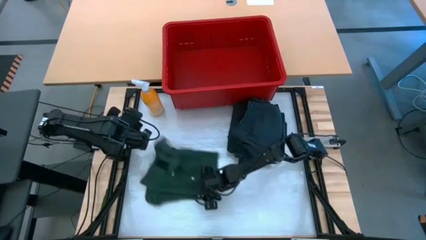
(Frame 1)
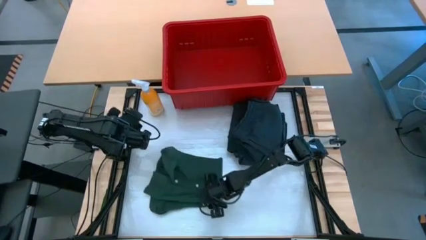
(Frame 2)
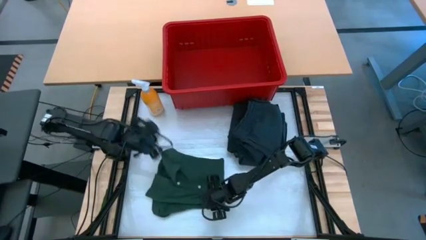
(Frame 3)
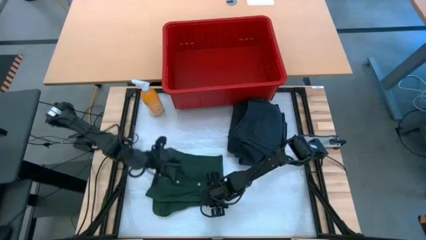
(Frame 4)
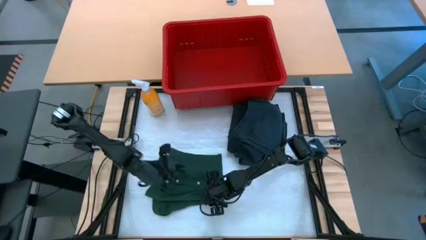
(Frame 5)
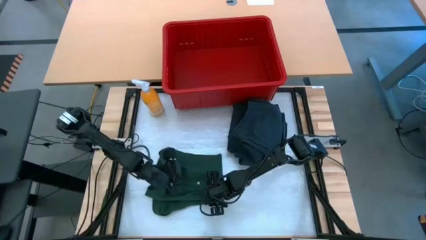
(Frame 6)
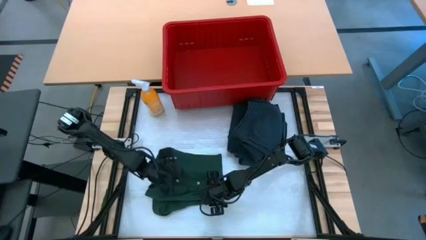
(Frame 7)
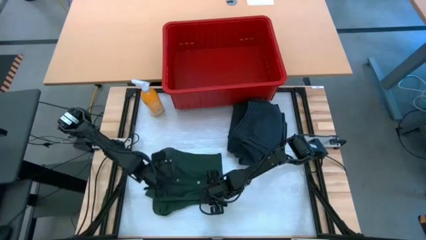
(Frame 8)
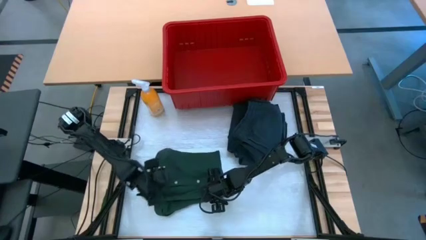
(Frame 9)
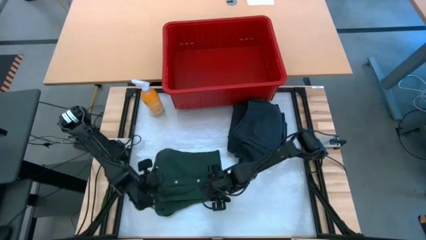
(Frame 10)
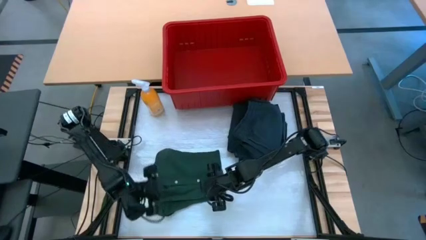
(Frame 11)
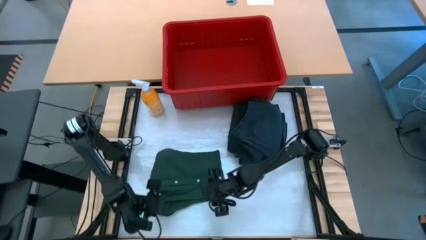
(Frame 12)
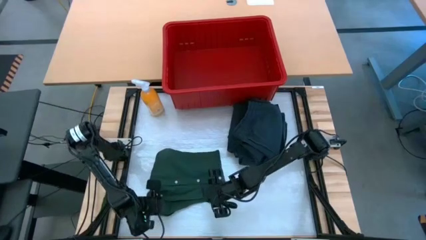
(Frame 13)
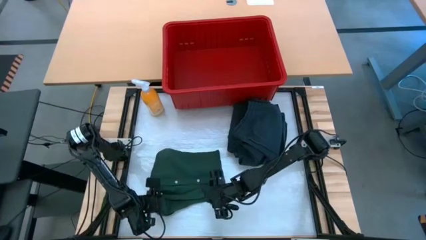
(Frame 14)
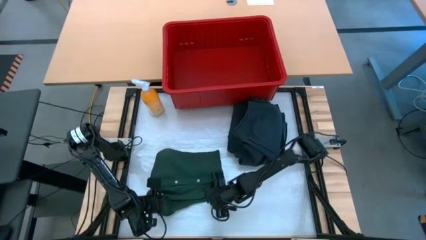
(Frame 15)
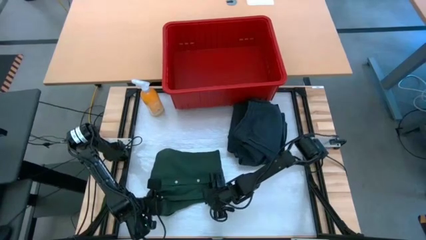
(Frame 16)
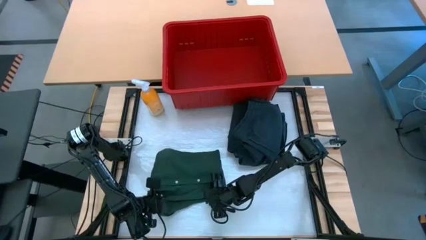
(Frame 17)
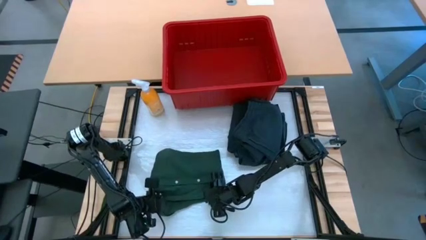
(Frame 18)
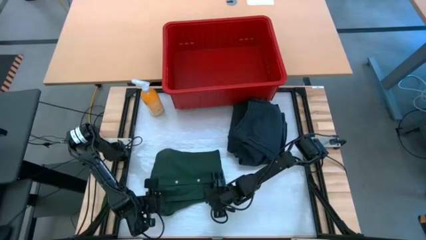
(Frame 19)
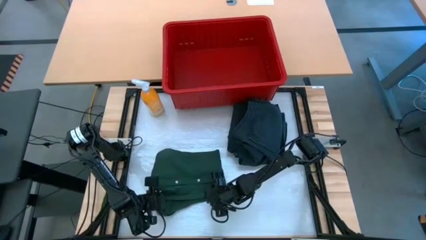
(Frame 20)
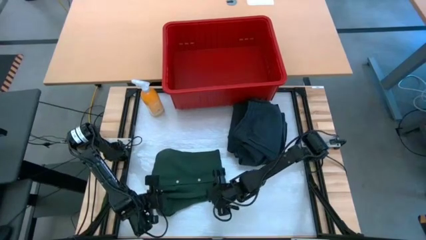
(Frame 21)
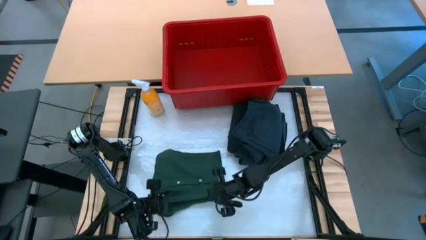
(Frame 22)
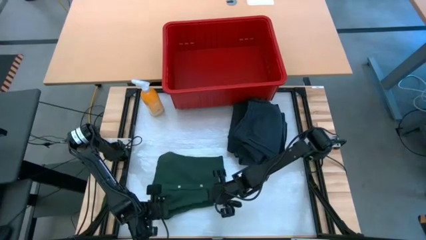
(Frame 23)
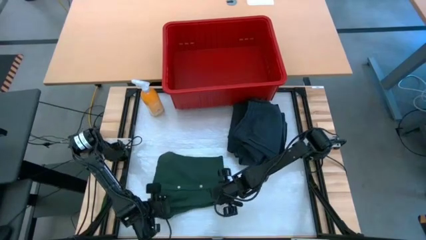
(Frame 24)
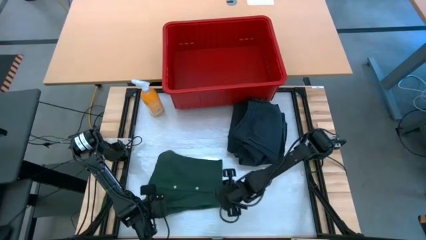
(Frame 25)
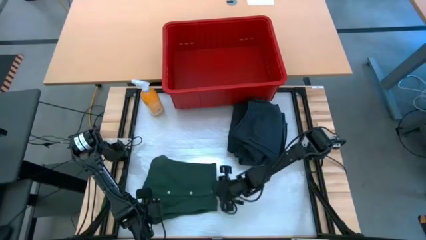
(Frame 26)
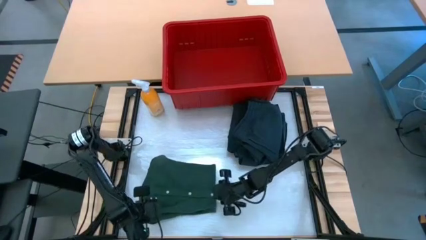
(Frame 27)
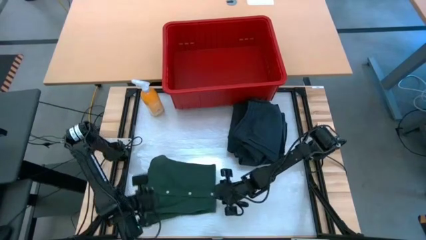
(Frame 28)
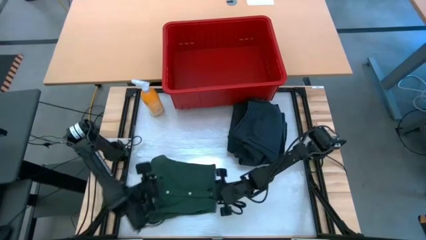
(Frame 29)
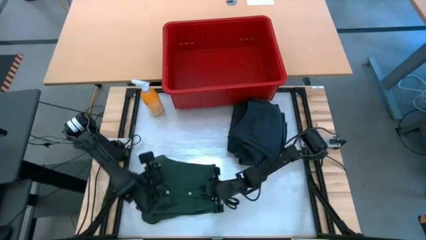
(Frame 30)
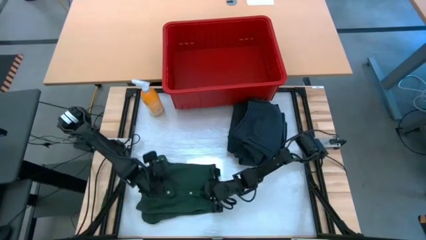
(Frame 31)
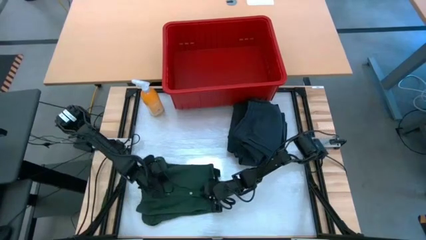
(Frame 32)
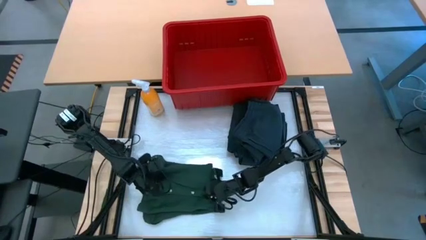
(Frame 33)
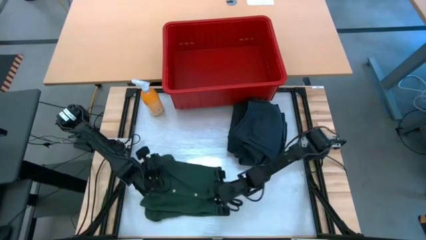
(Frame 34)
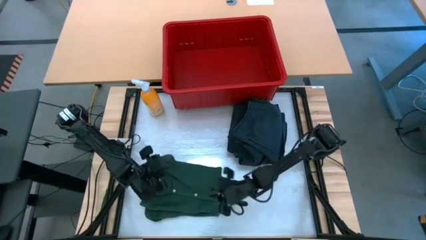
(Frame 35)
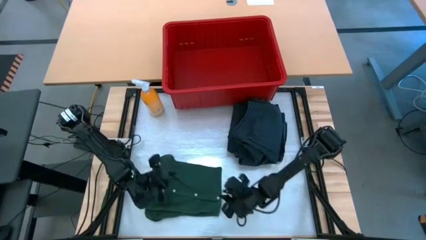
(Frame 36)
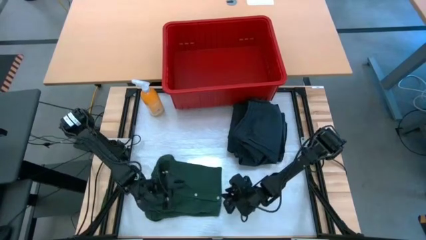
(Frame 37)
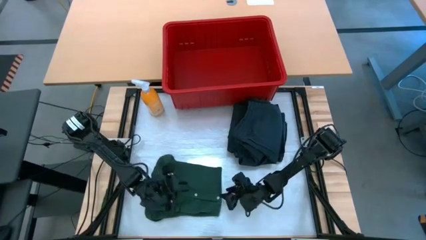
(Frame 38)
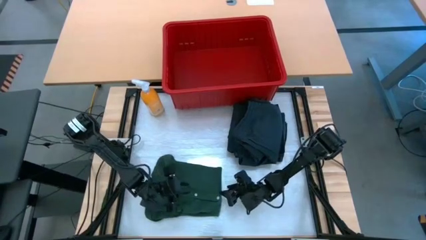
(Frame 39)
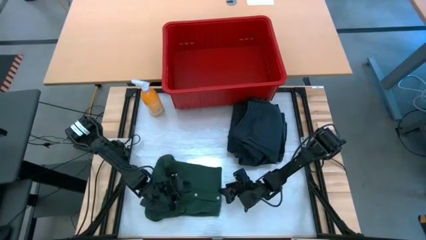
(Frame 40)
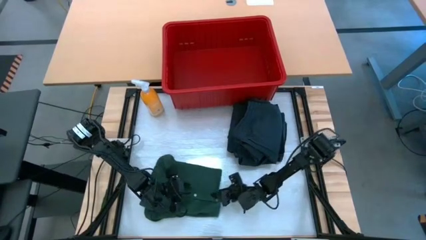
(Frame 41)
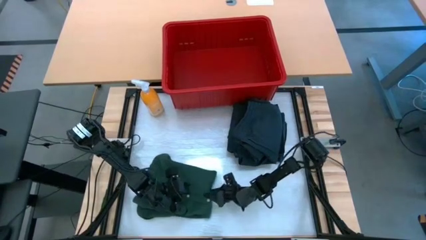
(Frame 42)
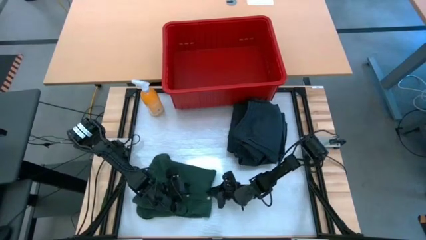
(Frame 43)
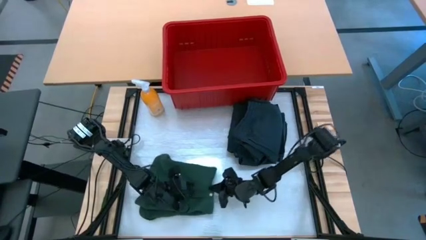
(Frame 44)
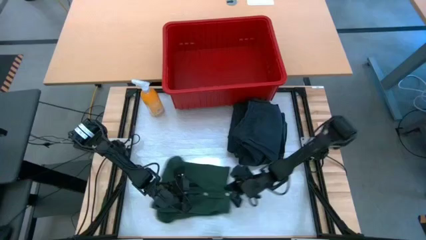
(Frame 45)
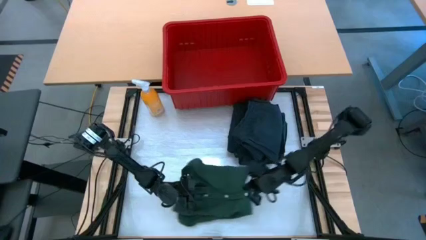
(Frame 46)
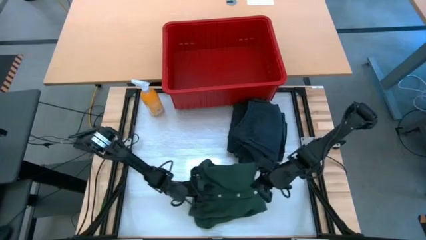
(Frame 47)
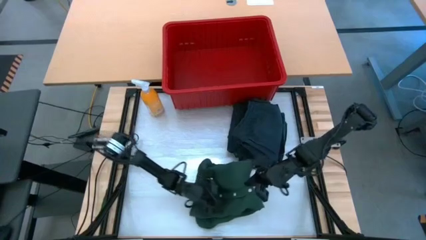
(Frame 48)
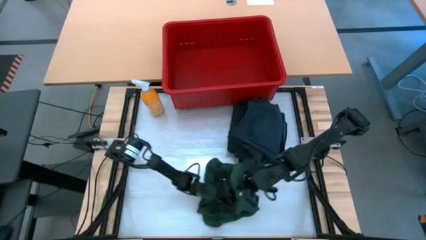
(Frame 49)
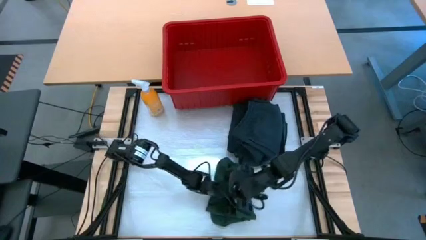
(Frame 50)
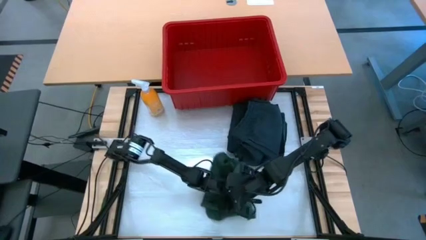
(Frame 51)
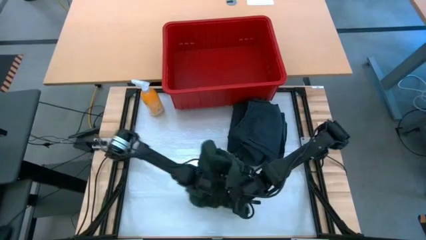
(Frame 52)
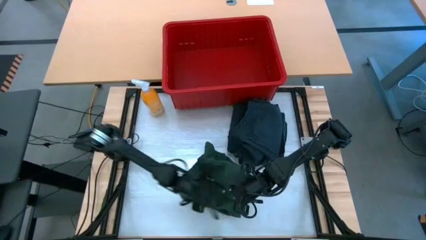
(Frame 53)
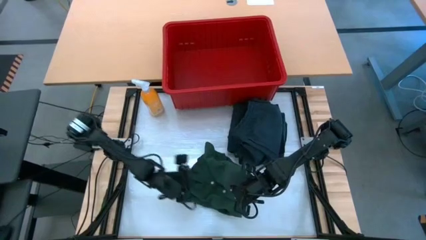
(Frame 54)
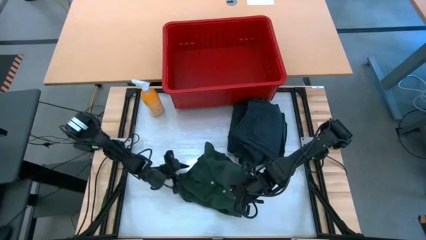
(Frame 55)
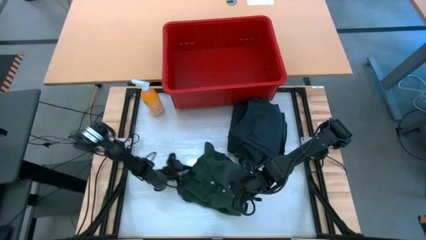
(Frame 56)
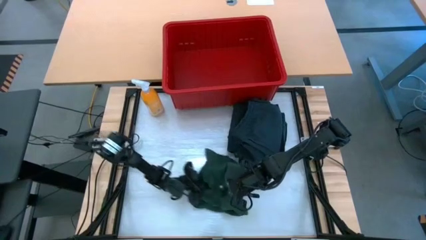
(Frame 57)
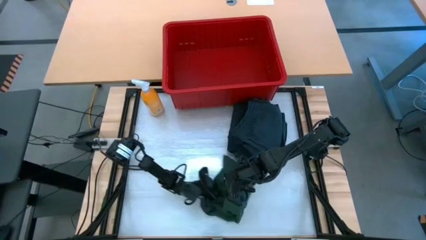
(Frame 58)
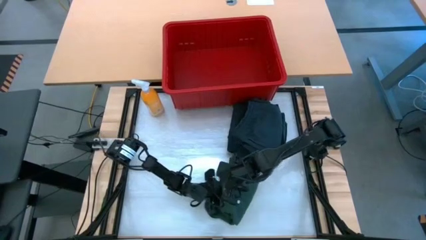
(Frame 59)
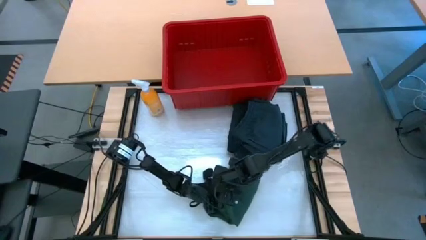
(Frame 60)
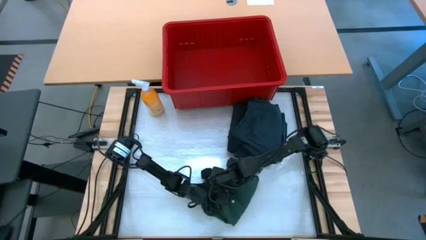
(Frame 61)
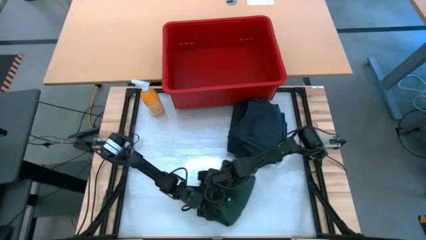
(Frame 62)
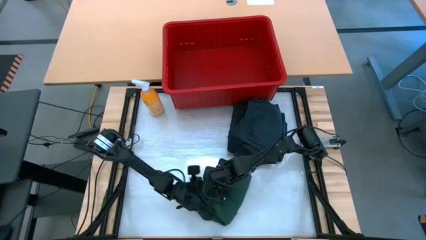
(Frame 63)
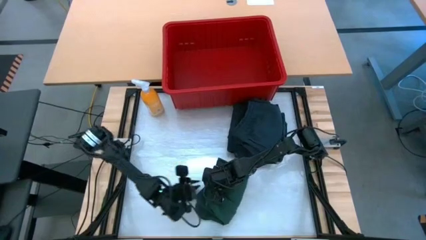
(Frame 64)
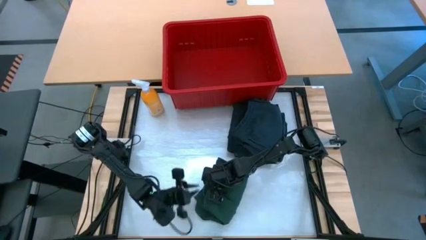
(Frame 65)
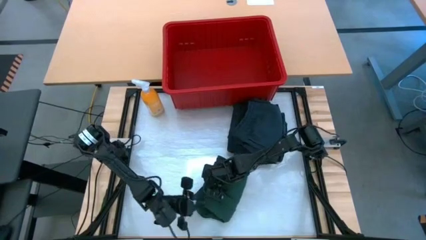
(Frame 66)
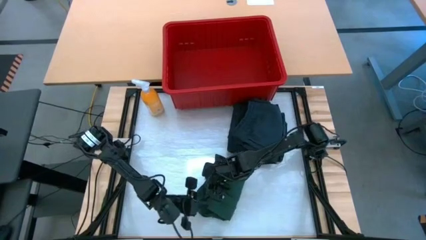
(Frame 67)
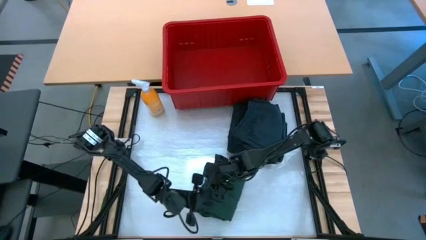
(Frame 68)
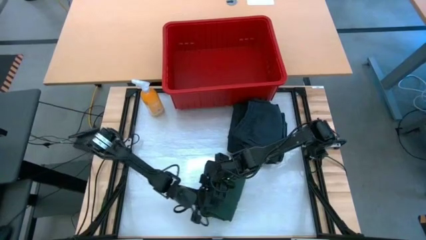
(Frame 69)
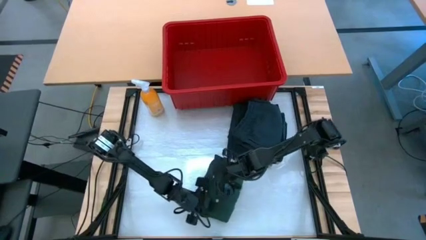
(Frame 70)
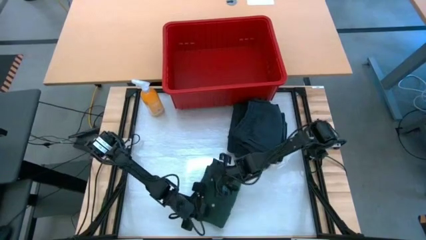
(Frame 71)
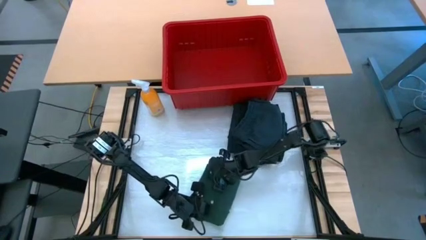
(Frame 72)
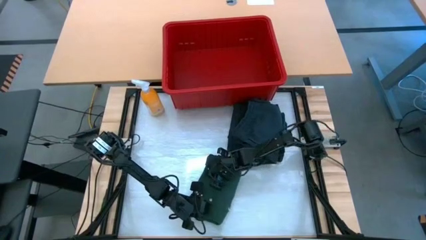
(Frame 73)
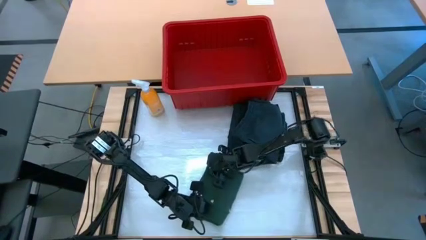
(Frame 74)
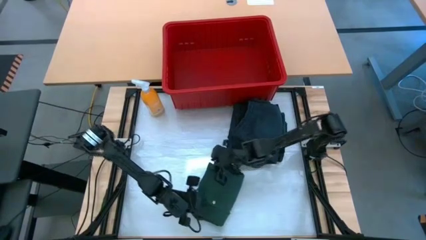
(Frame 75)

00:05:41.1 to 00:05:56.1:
Task: Fold Laundry from Bin
Fold the green button down shirt

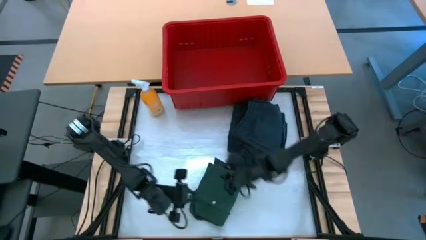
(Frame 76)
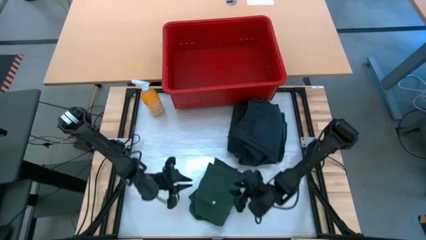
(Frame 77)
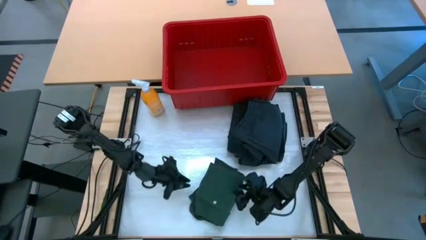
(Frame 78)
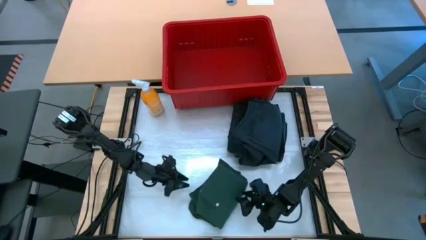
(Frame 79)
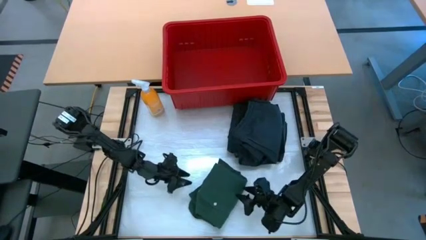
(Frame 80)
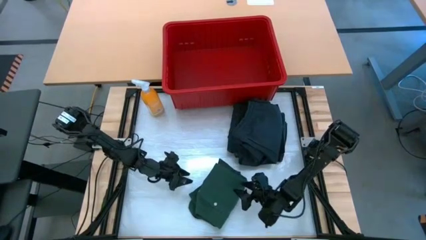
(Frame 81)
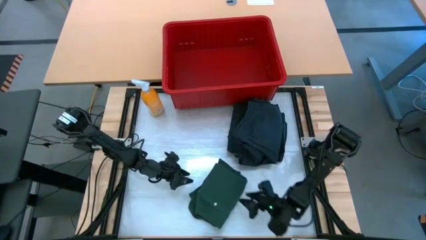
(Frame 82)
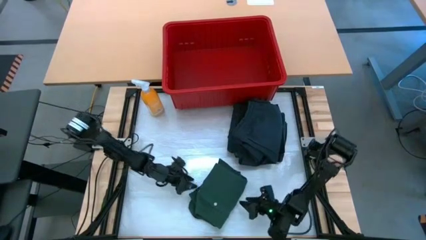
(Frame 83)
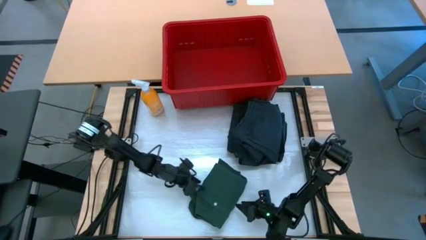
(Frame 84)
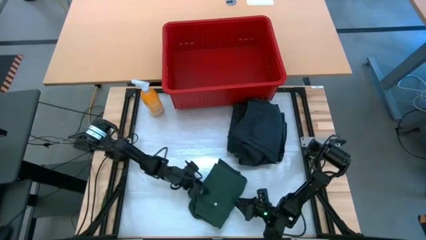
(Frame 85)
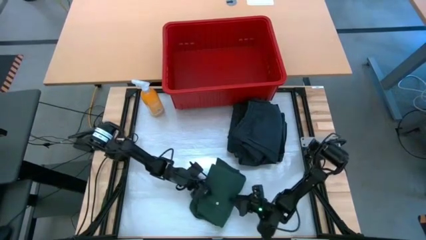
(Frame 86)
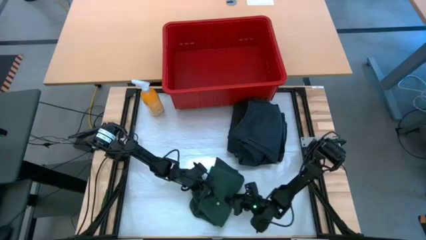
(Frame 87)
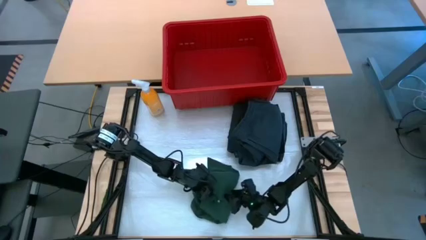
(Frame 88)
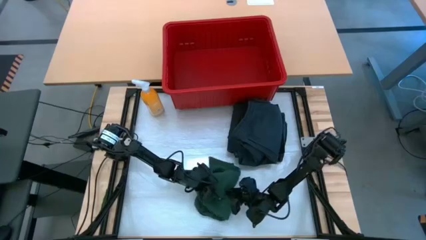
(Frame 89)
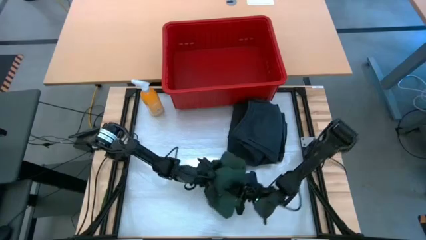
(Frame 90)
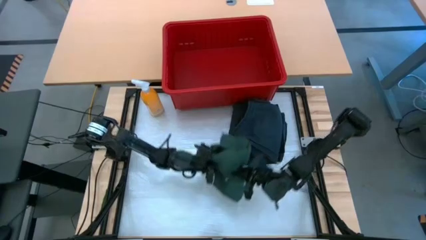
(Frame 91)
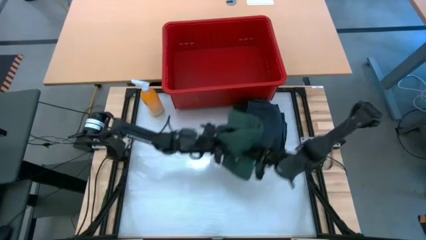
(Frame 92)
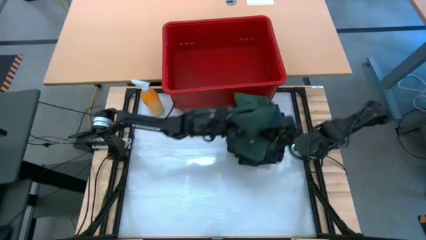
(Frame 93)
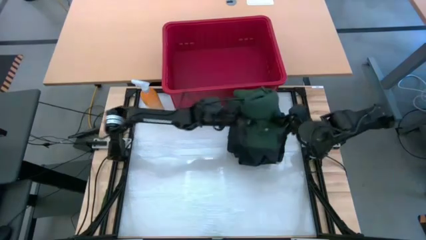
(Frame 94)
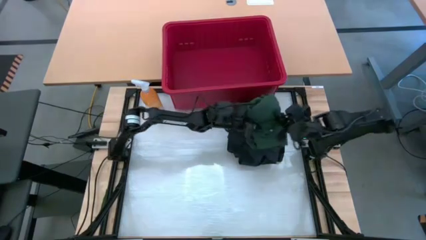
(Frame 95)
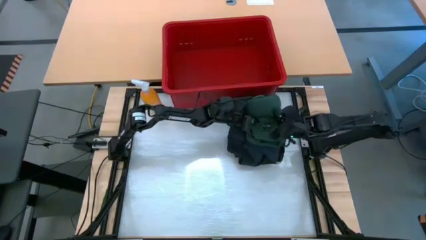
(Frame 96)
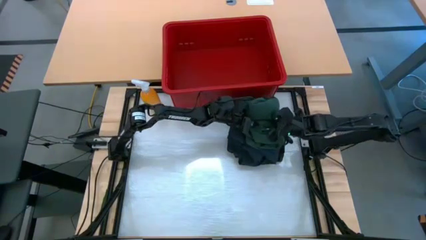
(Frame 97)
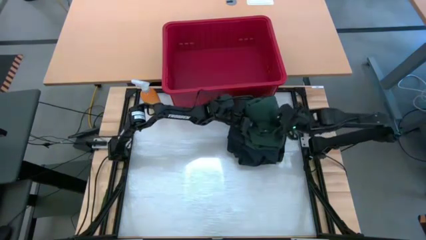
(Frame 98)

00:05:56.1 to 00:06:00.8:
Stack the green button down shirt on top of the black shorts
